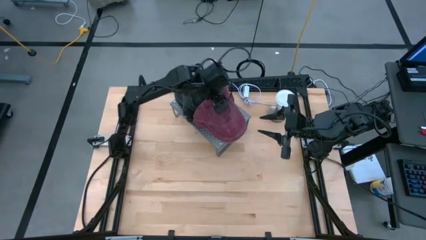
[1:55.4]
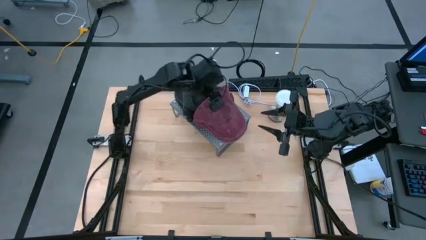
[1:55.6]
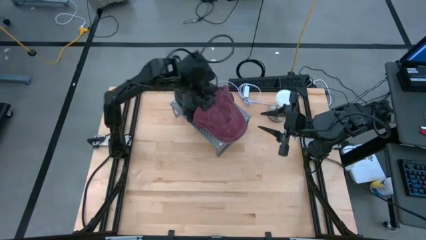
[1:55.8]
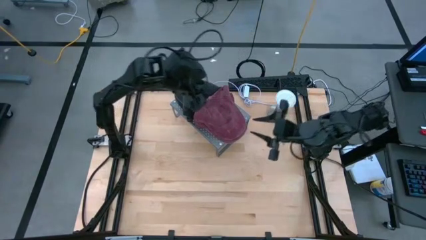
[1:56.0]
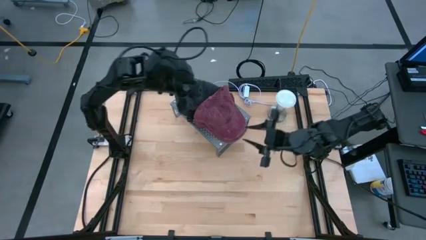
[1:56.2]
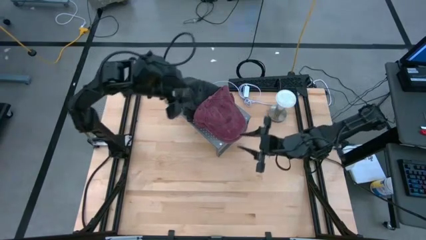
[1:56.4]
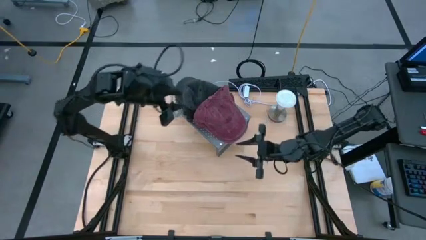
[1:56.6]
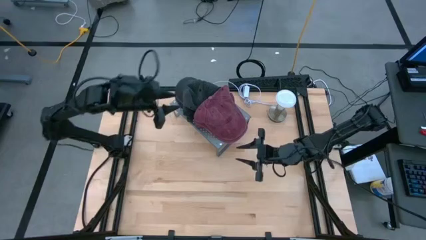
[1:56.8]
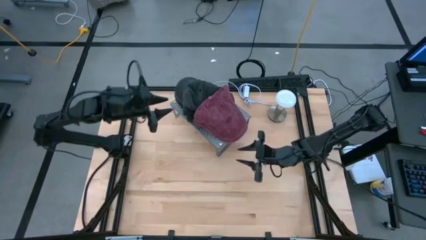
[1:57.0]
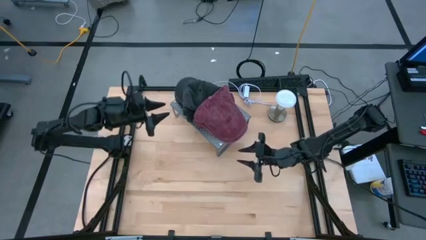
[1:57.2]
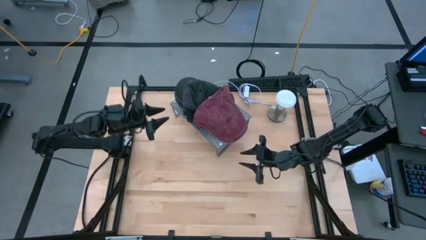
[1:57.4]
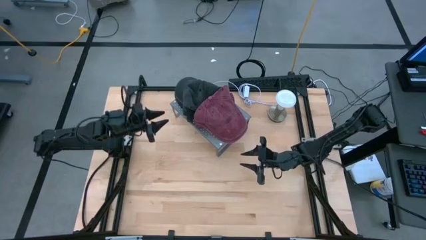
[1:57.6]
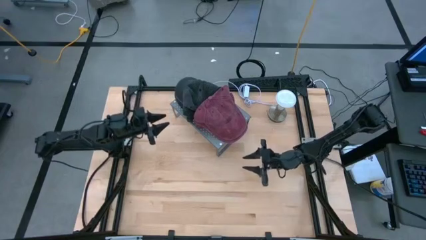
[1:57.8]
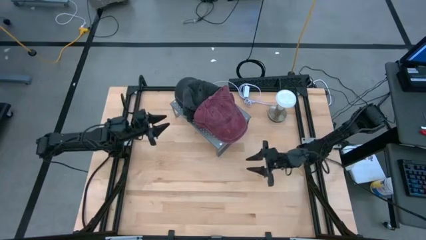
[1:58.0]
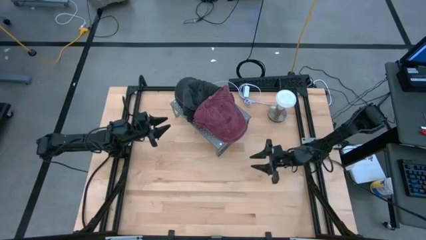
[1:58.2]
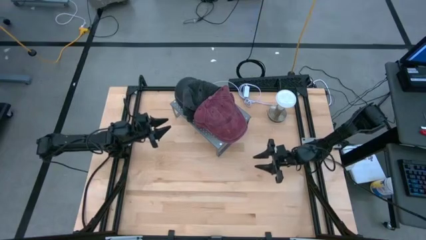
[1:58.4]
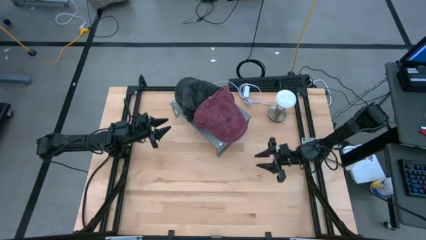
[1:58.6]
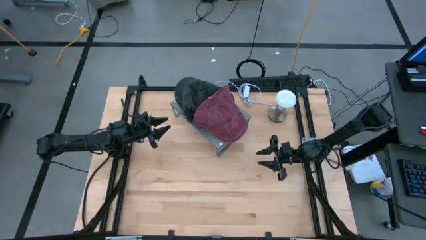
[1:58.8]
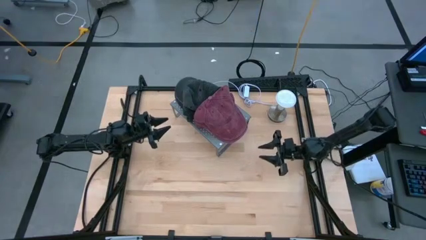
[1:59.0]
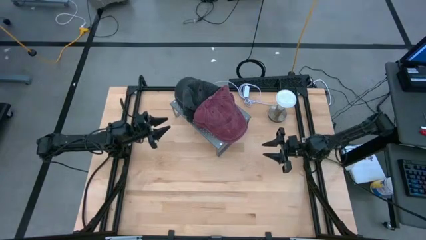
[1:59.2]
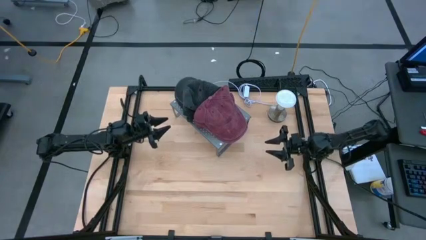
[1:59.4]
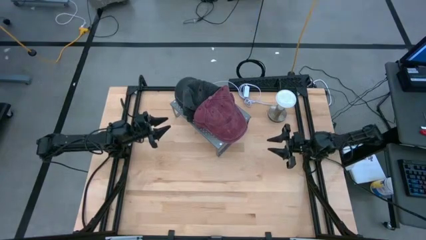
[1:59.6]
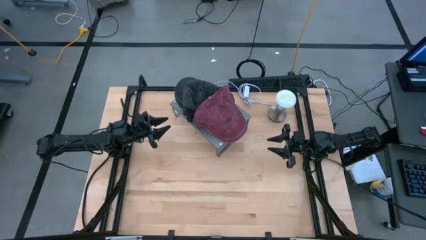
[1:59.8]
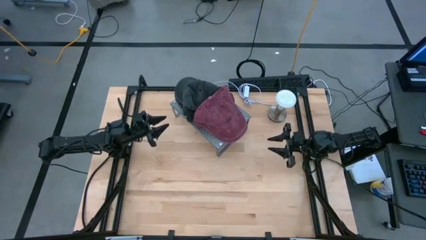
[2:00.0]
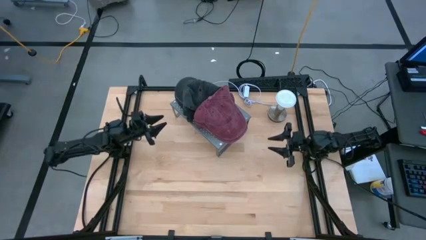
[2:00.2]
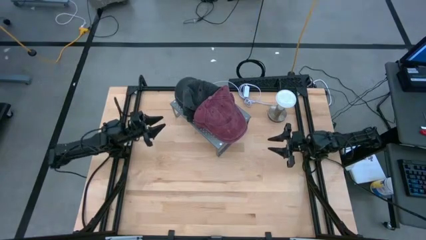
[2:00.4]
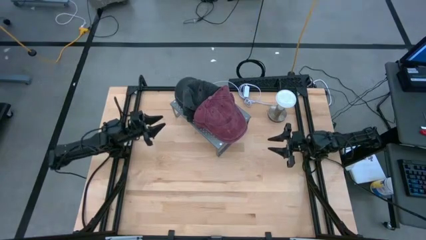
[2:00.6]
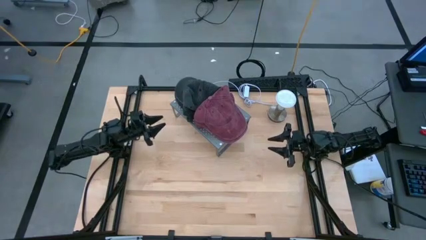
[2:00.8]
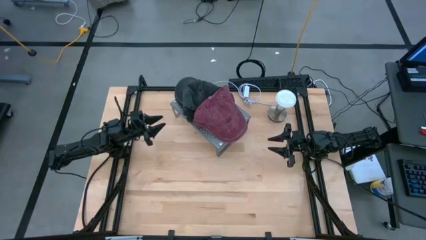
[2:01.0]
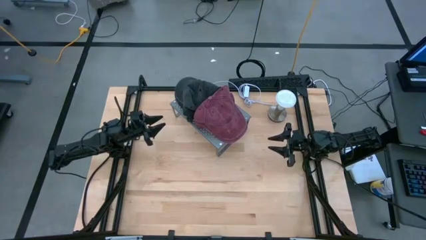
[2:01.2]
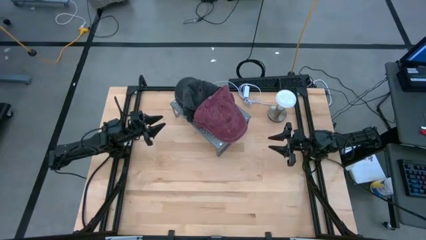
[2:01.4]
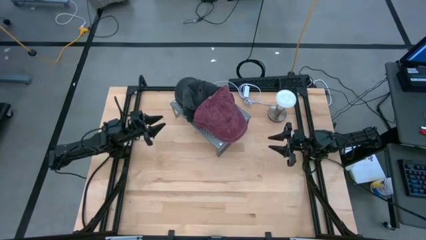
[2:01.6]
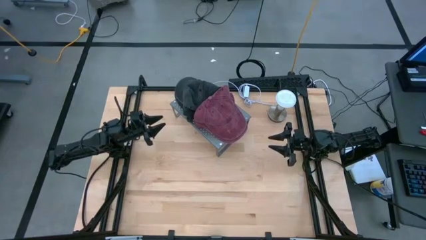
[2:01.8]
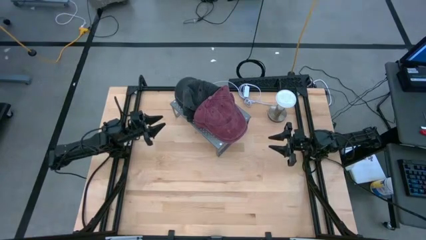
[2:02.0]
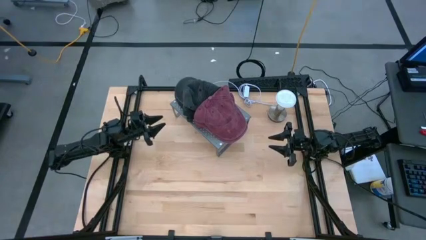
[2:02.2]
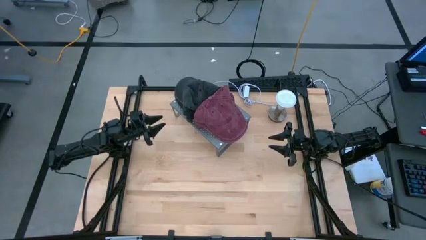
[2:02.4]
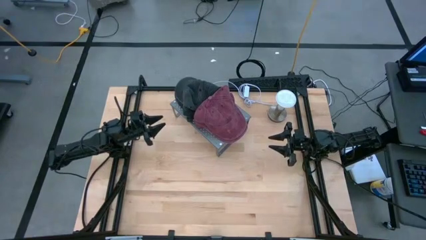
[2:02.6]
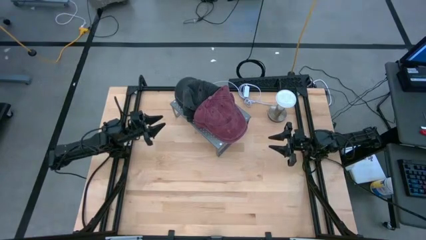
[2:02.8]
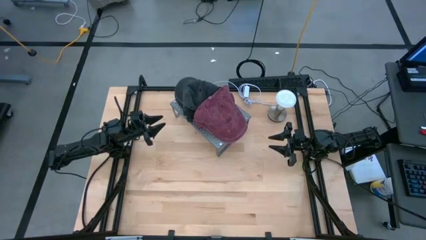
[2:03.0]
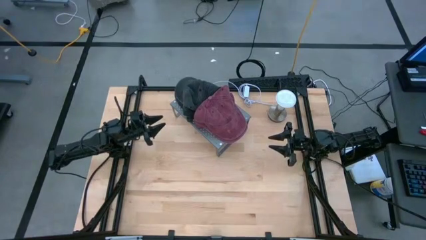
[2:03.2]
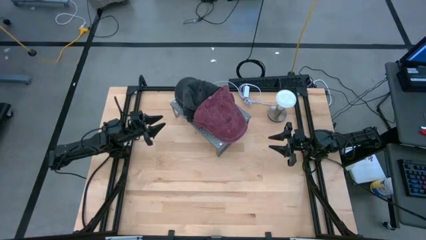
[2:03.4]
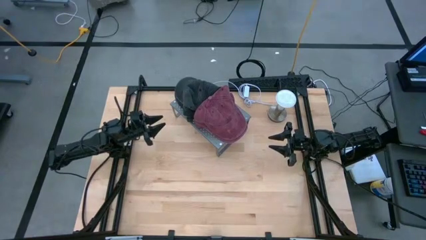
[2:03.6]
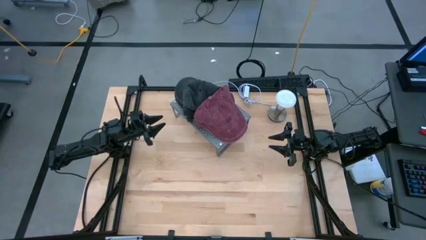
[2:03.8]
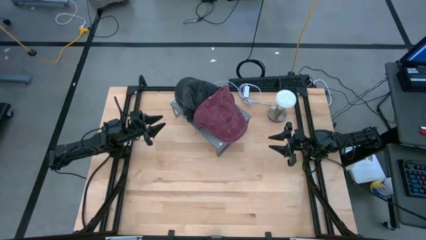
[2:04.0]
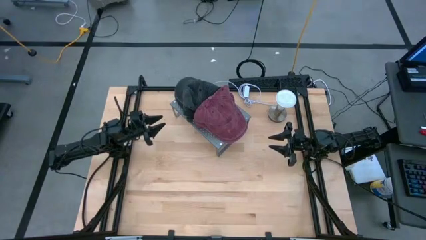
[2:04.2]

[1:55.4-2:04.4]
Task: Pick & Place hat
Return to Home Position

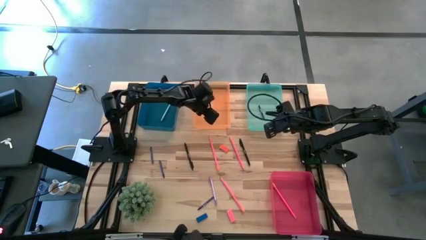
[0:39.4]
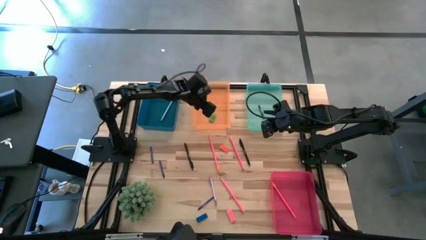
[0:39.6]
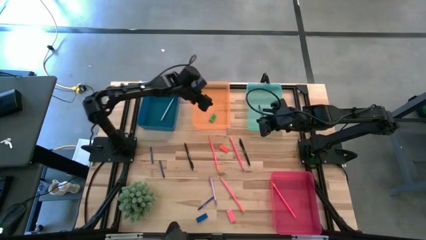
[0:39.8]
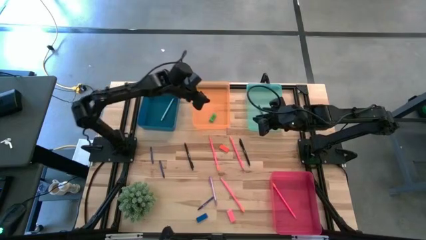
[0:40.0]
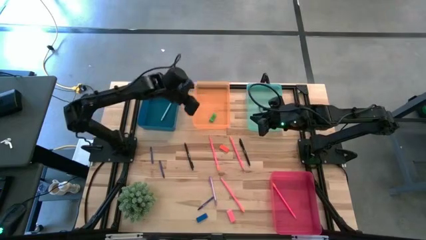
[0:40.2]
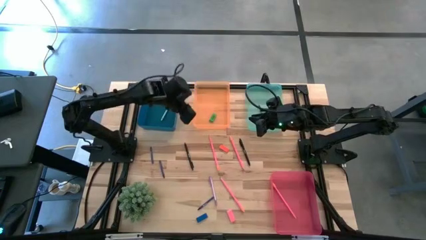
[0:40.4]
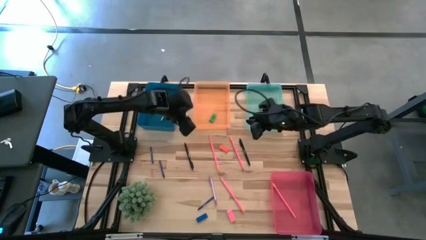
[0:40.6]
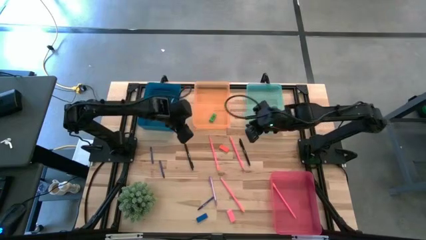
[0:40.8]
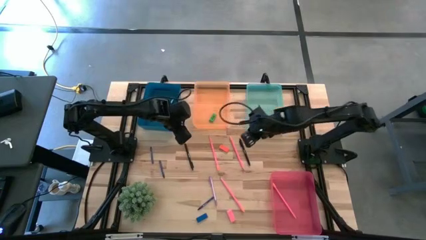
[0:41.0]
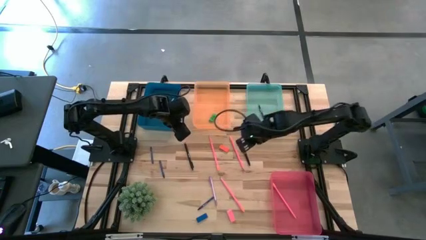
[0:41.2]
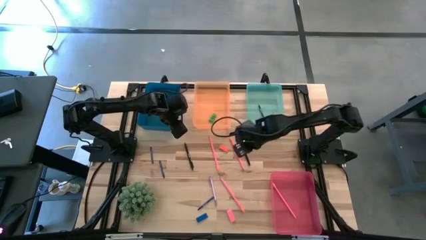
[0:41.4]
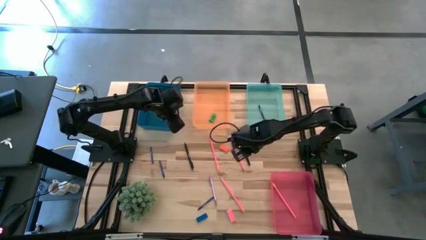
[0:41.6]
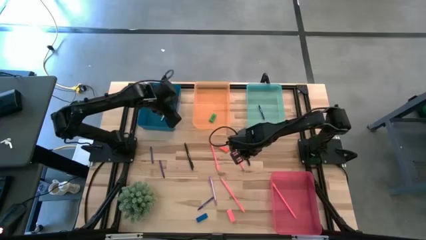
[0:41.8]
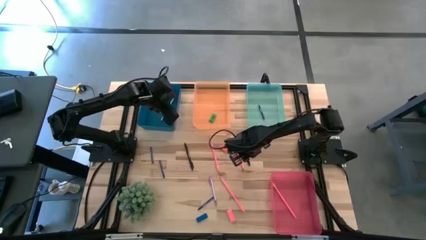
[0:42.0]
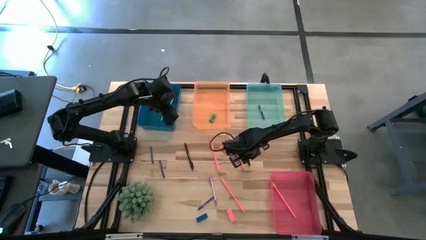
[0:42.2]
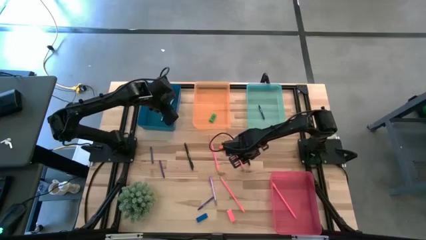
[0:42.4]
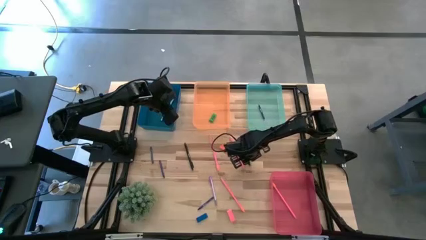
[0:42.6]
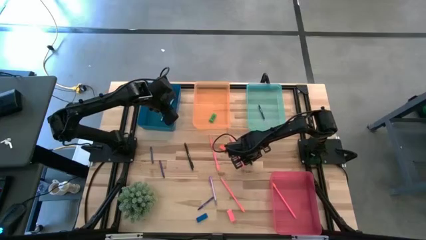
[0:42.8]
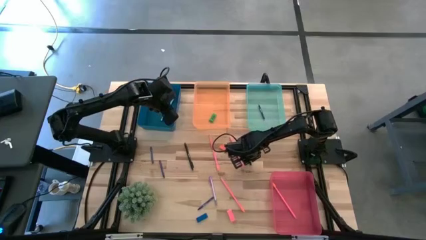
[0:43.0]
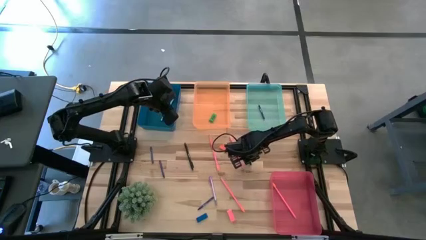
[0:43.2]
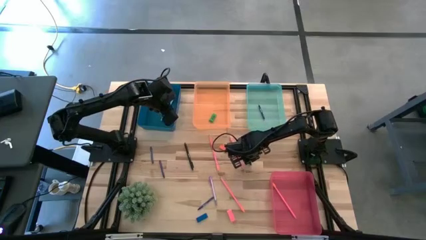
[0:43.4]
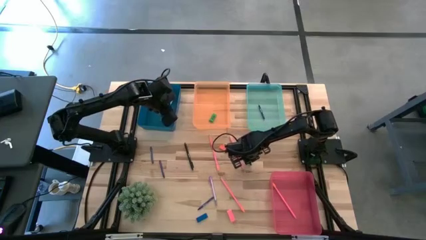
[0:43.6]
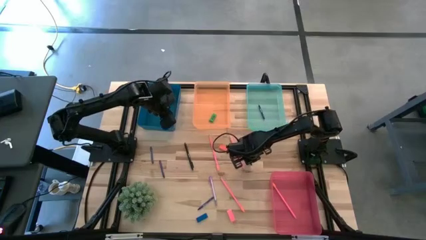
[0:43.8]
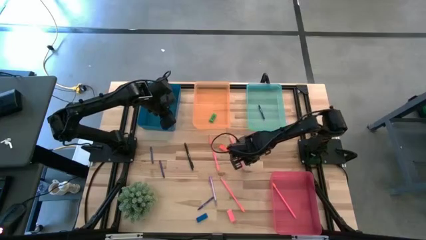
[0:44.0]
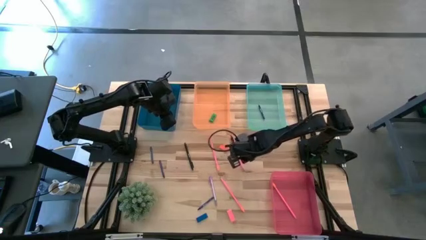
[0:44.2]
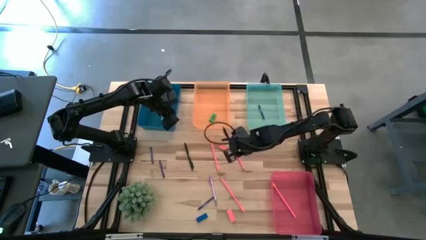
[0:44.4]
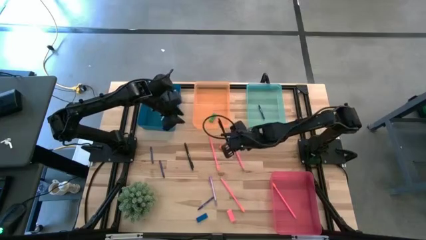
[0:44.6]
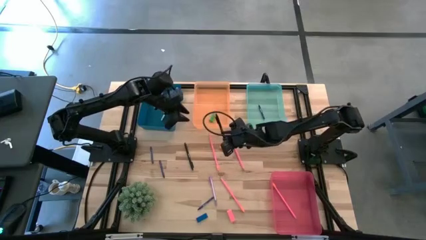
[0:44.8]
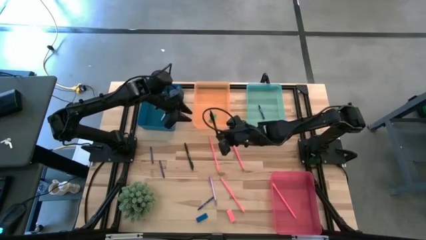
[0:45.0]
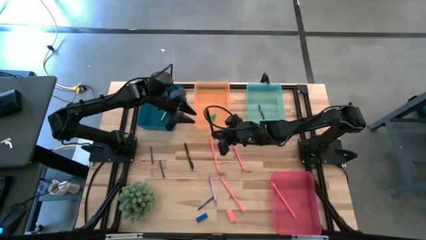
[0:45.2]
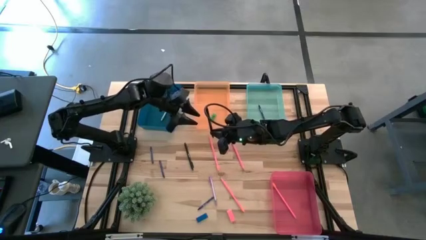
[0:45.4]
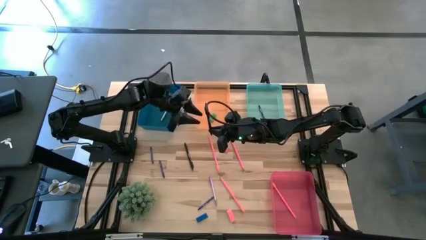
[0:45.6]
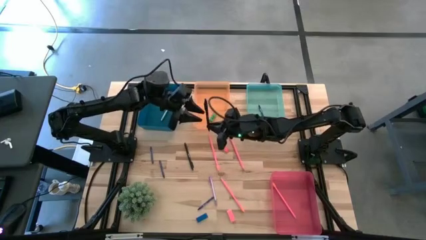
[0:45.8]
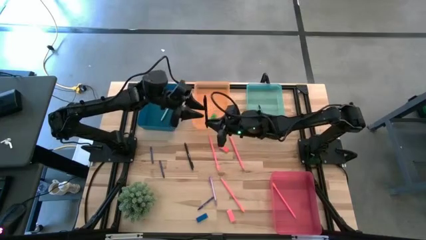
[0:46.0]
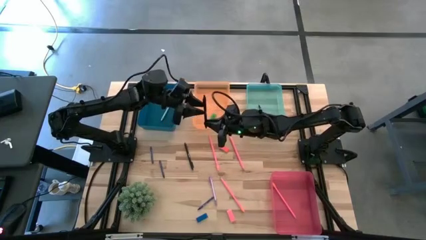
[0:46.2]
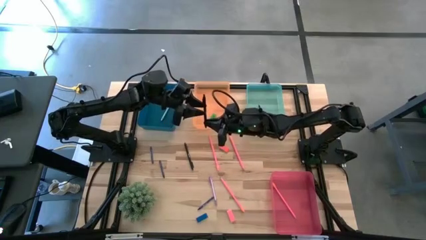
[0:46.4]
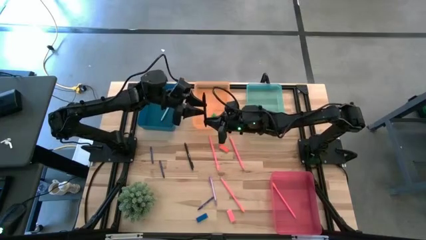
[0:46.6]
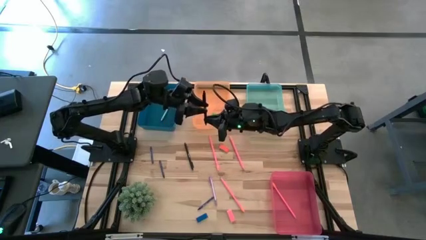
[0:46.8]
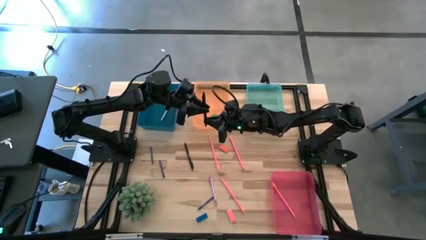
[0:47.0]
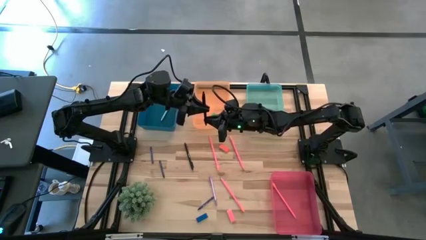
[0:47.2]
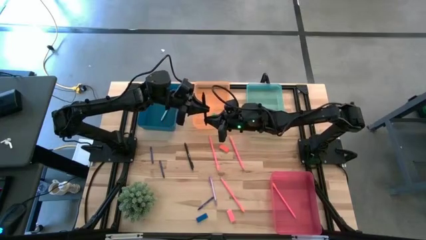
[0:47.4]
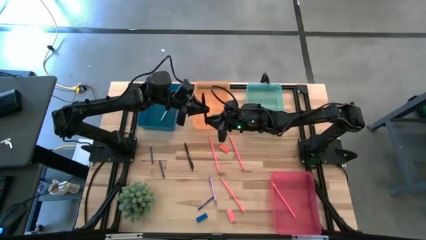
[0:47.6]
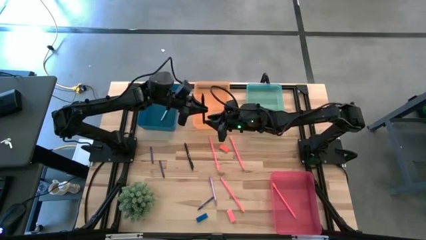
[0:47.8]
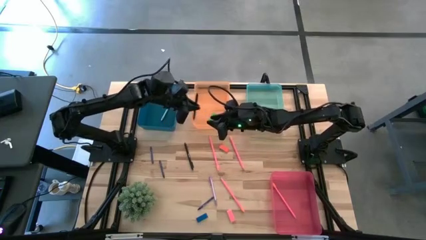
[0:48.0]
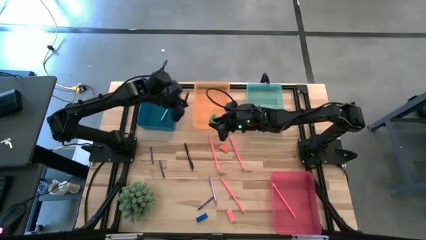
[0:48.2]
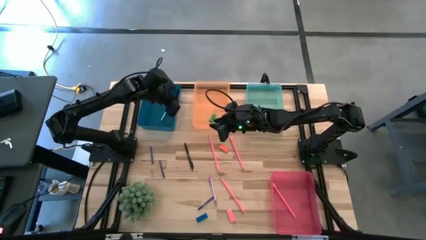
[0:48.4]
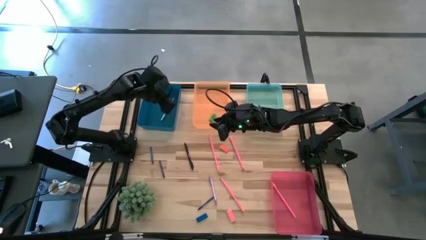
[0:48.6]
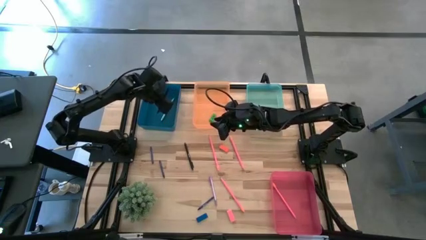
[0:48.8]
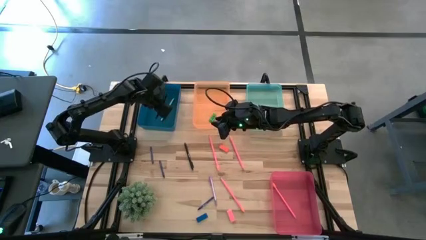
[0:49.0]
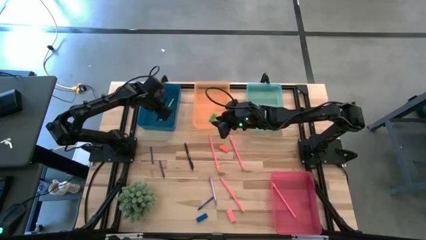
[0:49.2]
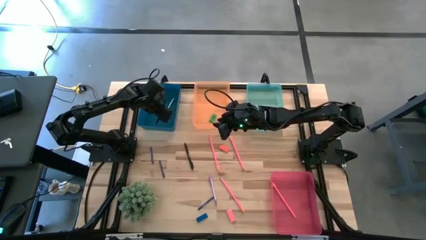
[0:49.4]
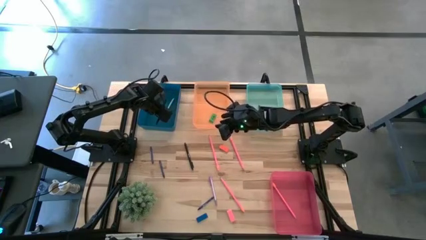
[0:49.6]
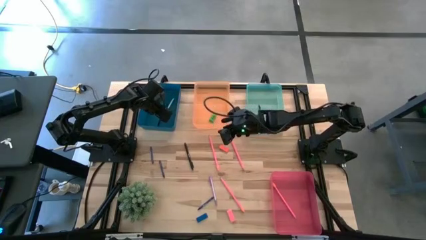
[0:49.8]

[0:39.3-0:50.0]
Task: Sort crayons/erasers/pens/pencils in bins
Put the right black pen in the blue bin
